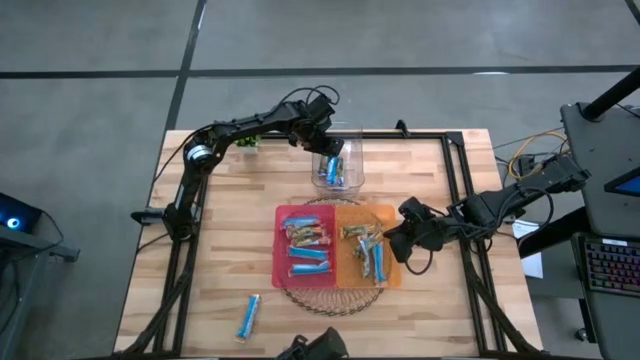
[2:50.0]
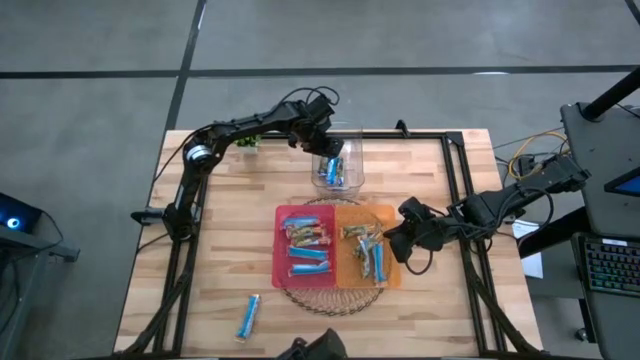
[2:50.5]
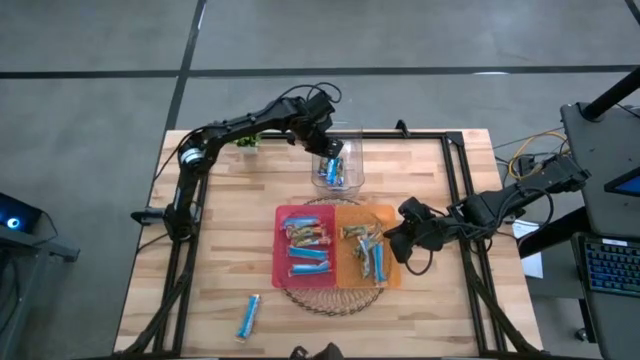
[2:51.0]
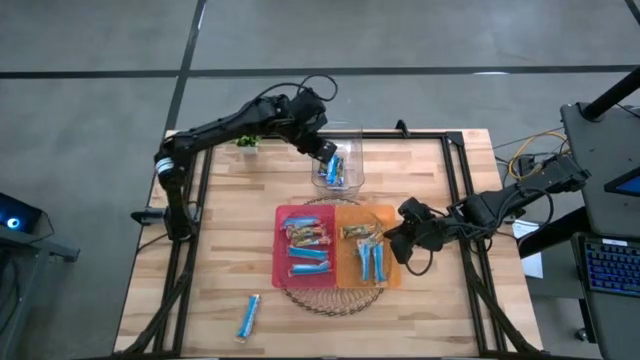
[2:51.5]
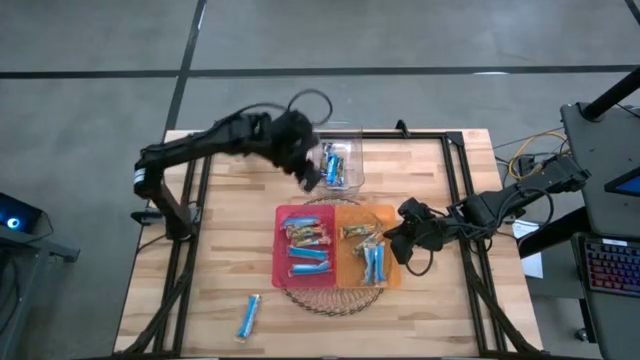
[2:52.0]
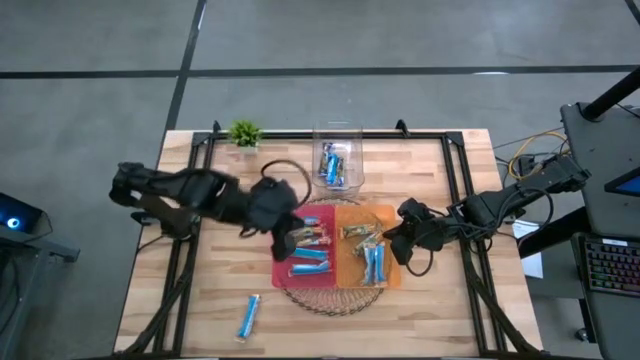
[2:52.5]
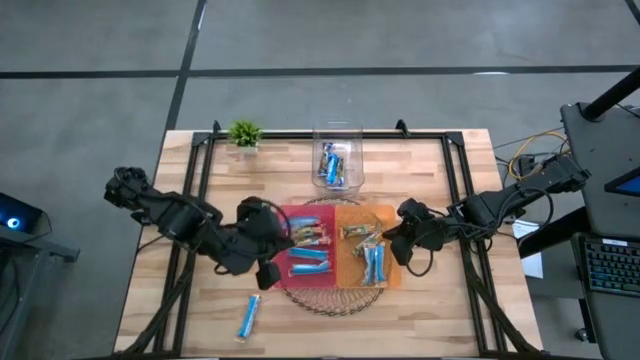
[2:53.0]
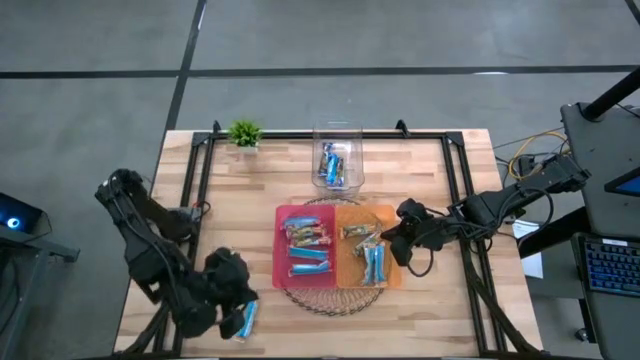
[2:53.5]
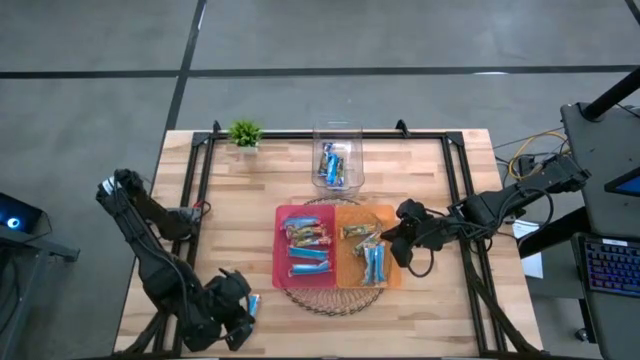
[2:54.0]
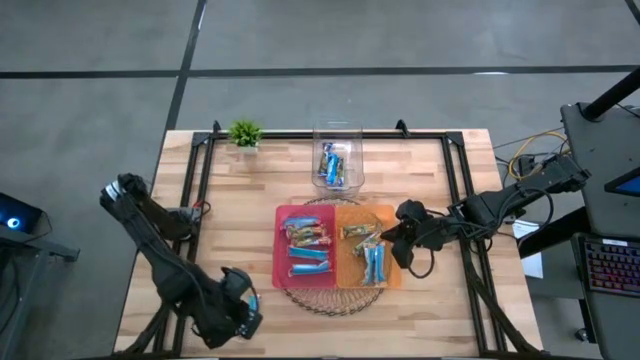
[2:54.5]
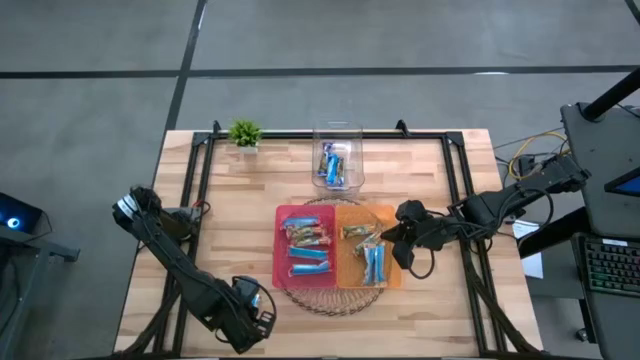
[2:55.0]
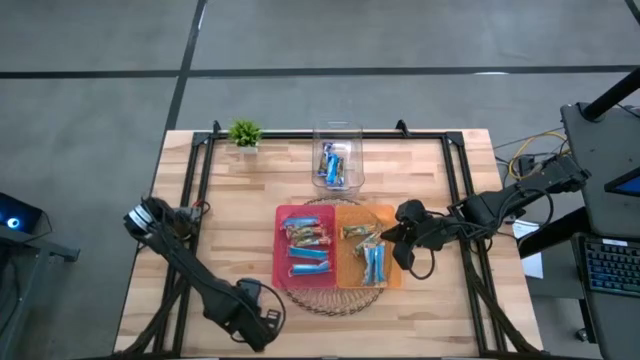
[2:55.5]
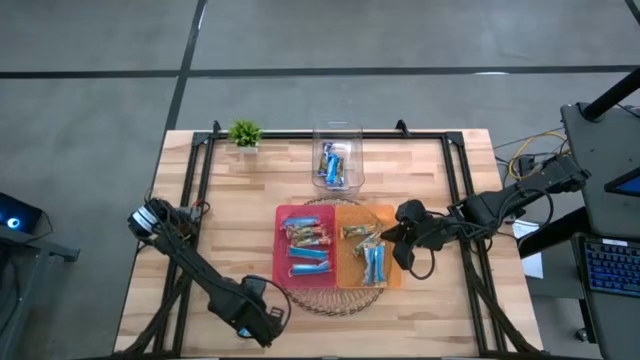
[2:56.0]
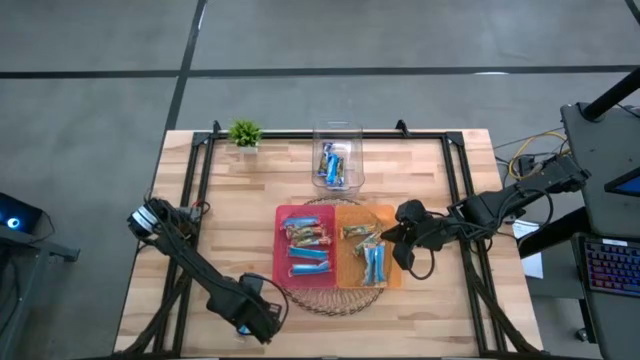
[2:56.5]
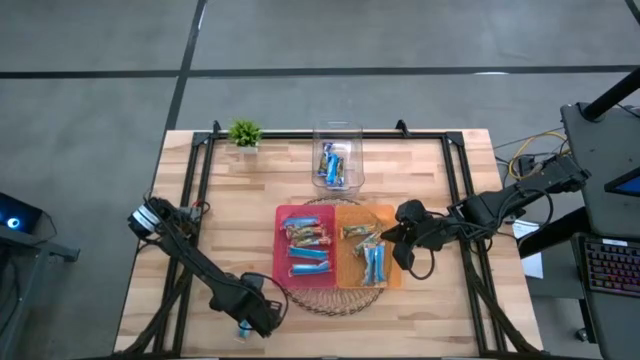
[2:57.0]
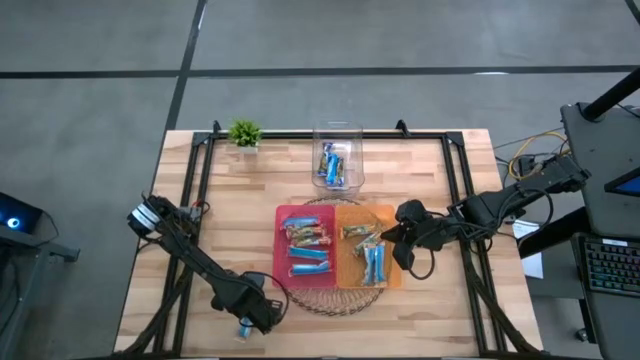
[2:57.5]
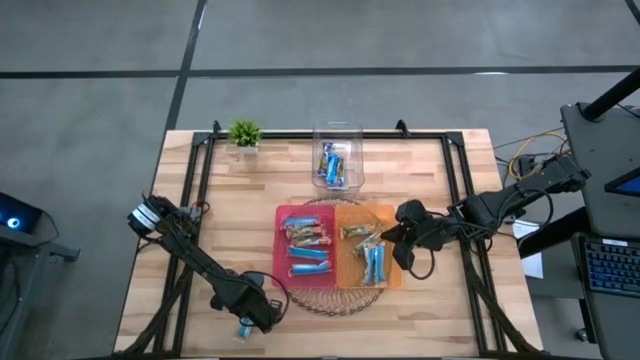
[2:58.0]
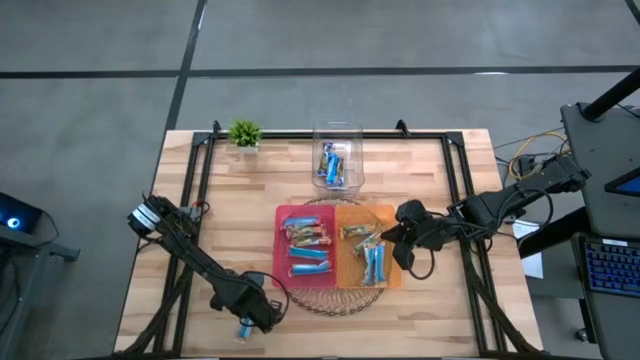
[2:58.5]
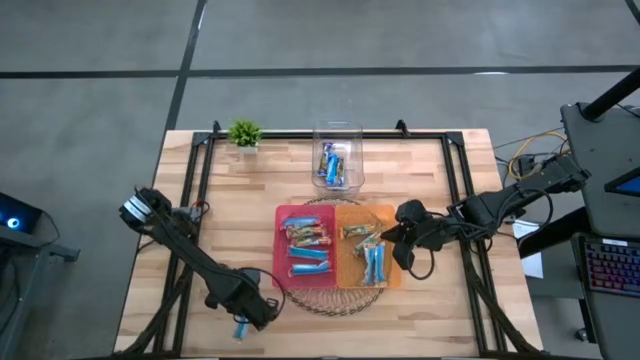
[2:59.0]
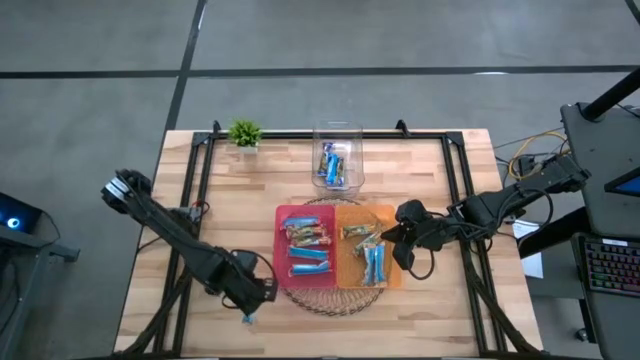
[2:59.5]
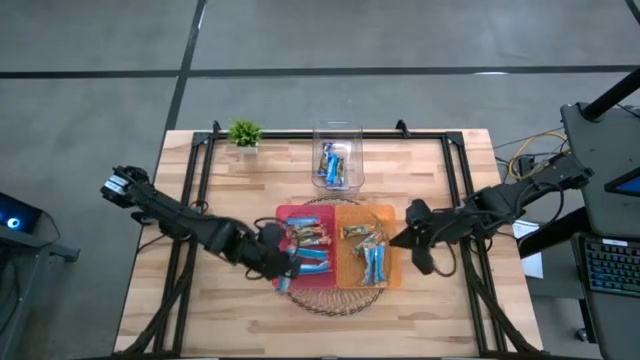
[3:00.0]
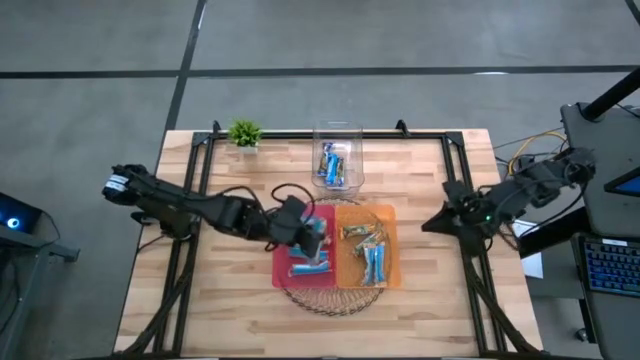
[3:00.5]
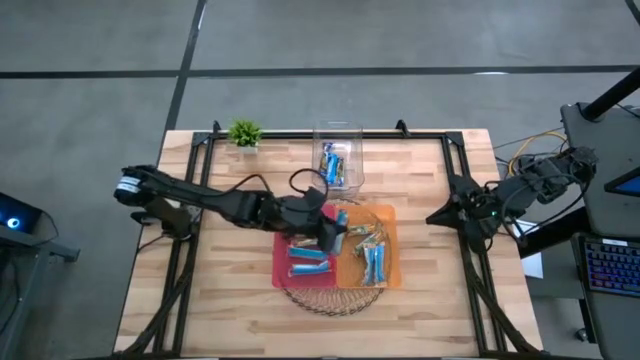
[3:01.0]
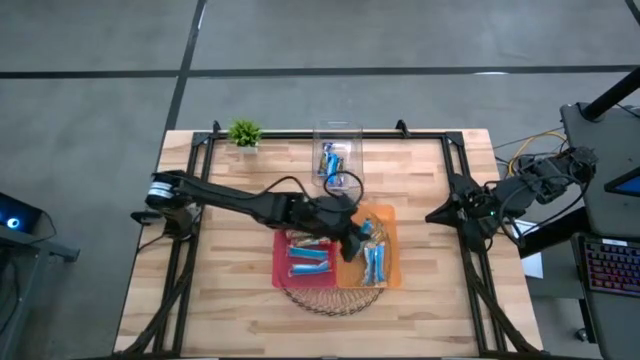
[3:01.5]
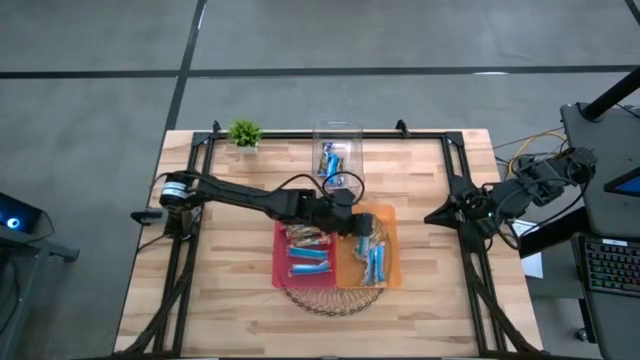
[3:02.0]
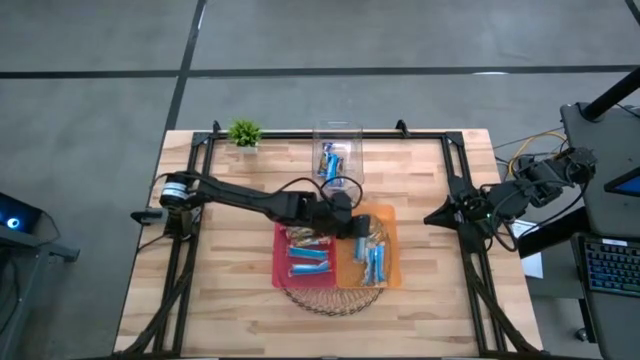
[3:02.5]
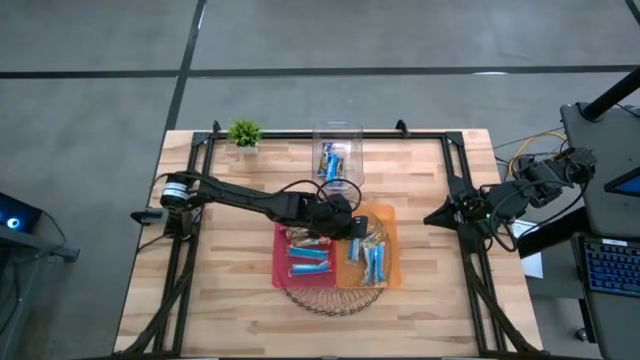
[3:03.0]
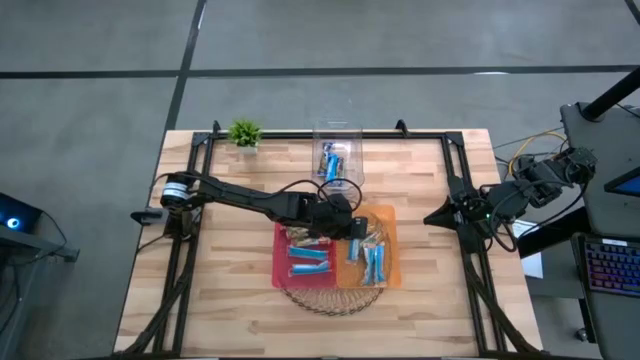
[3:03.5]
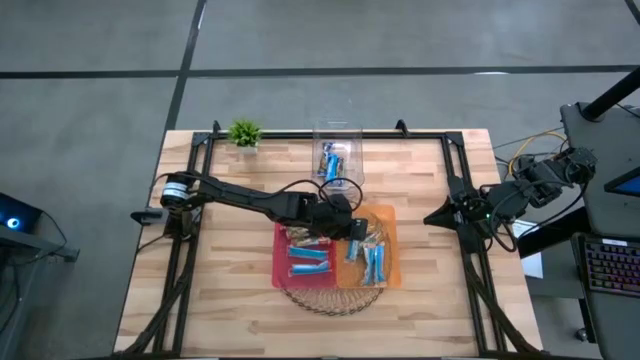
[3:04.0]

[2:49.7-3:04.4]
Task: Pick and place Granola Bars by type
Put the yellow granola bar into the orange bin

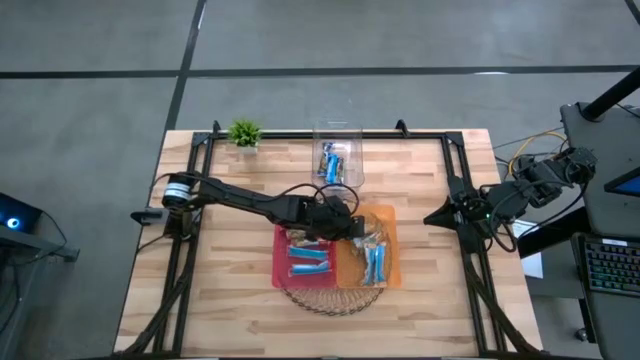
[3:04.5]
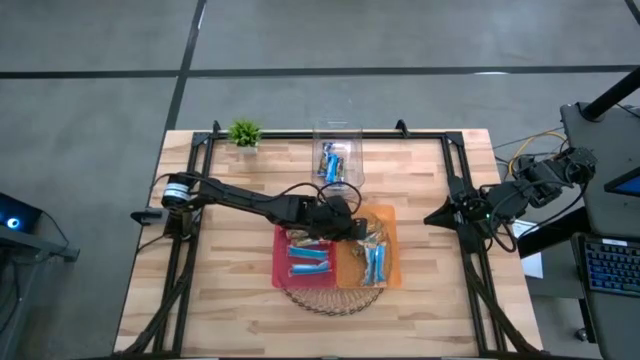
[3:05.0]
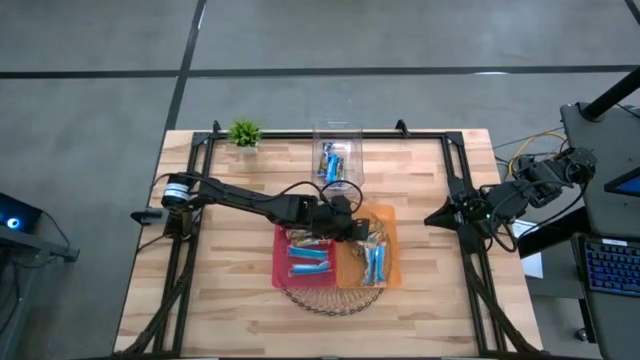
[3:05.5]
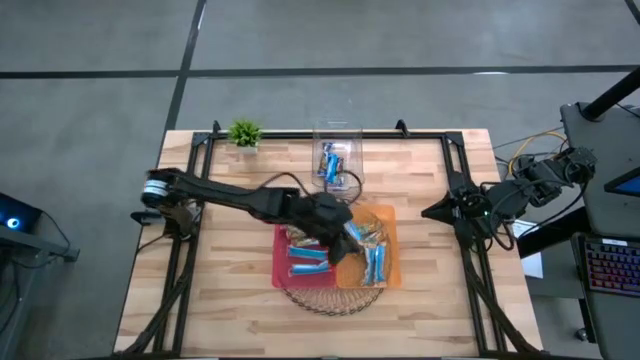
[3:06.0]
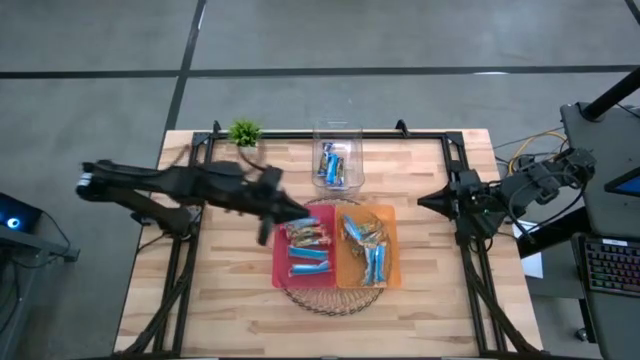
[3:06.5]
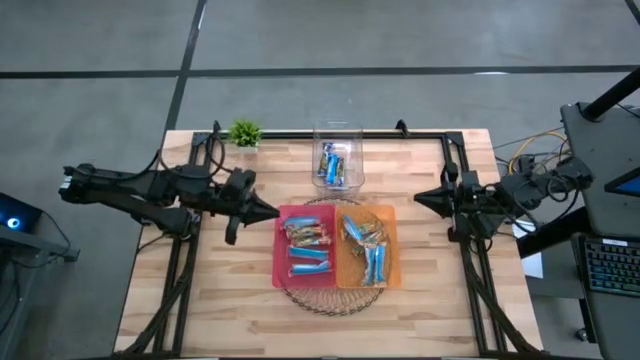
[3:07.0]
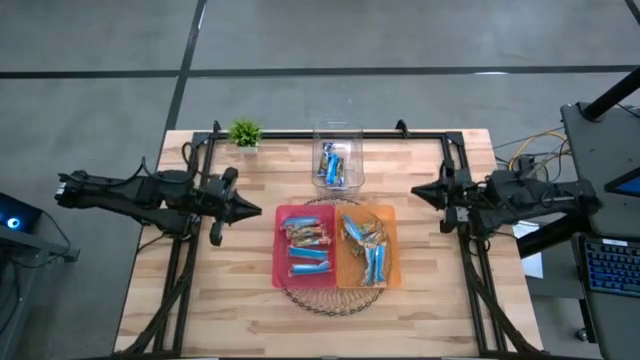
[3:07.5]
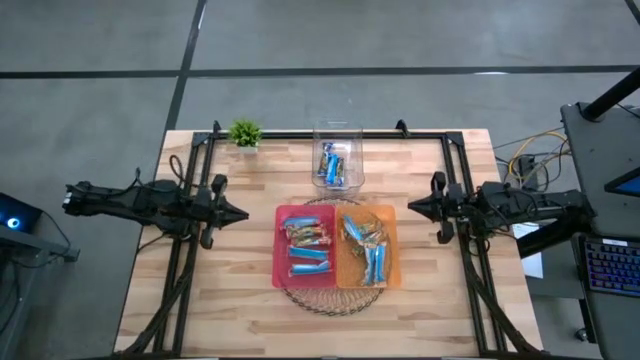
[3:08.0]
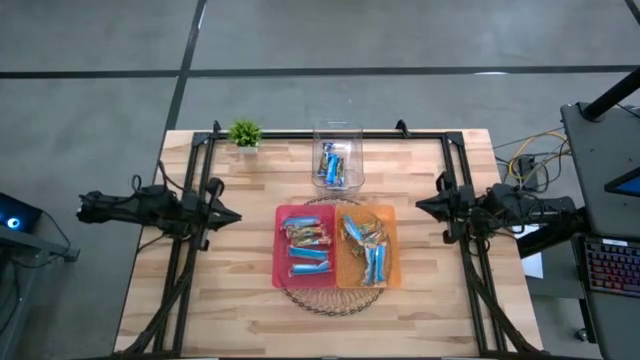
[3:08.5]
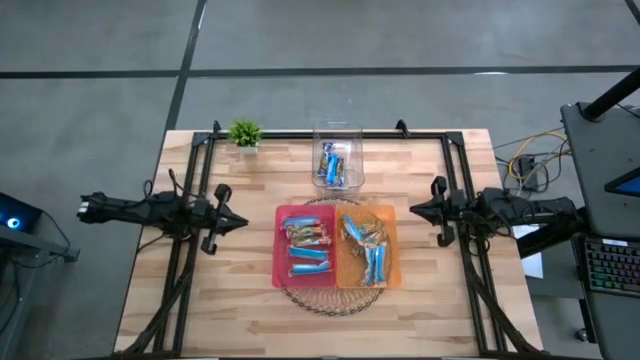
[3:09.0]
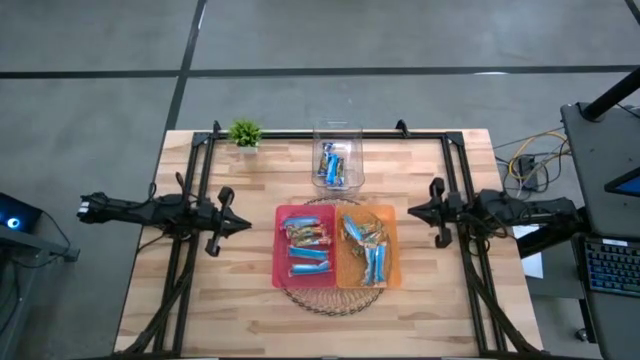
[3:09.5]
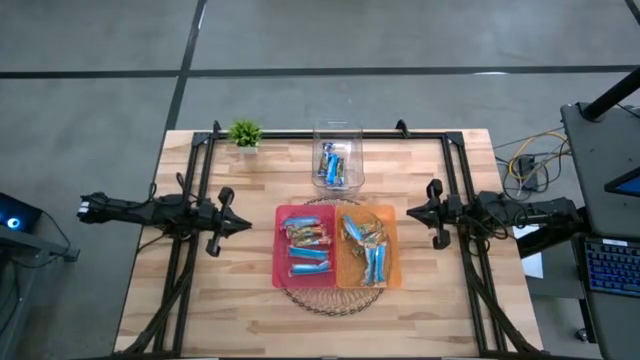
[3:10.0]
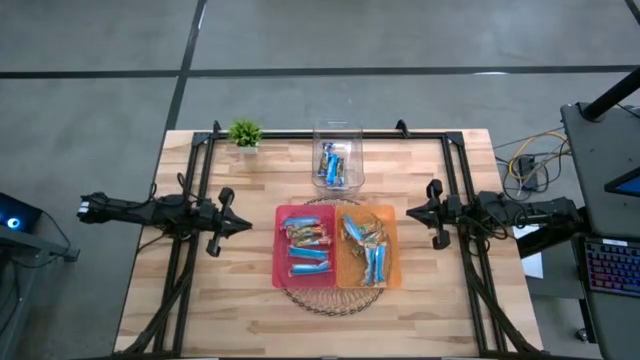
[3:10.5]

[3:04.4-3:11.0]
Return to Home Position

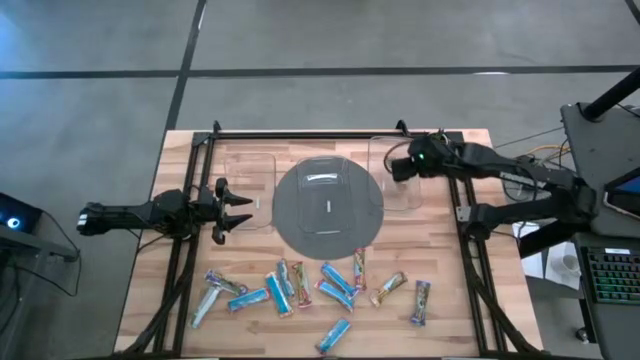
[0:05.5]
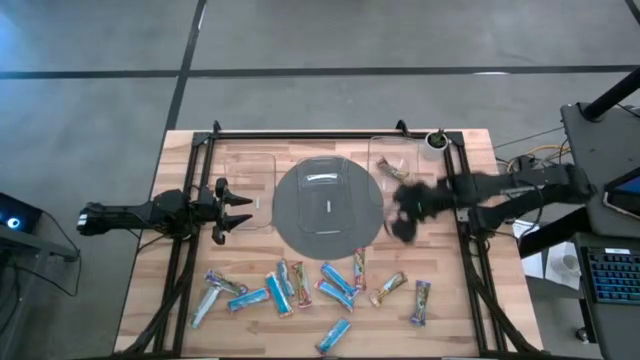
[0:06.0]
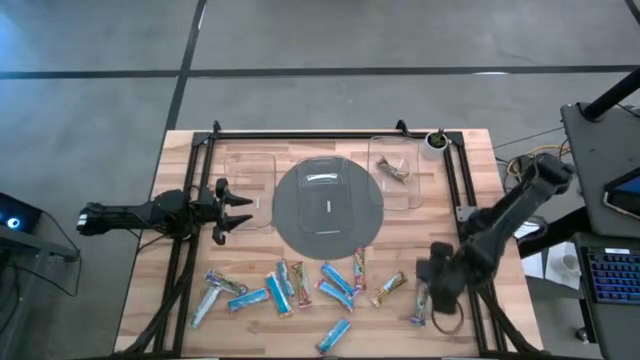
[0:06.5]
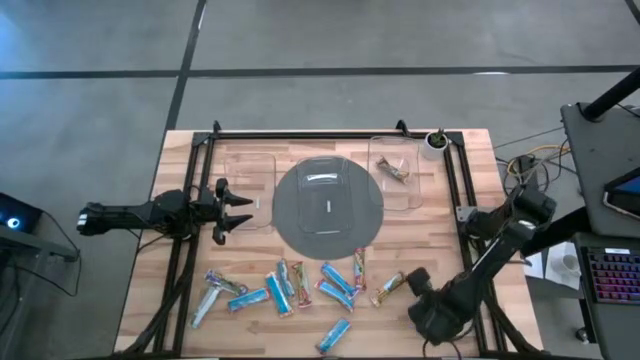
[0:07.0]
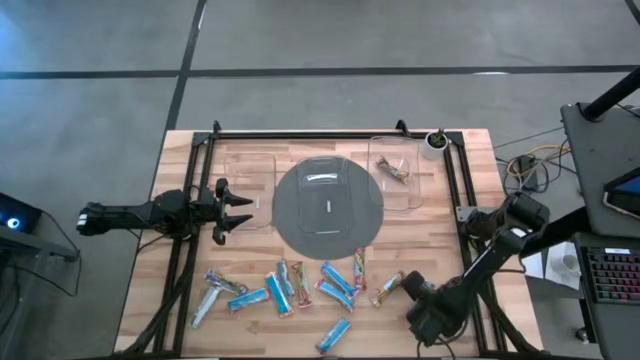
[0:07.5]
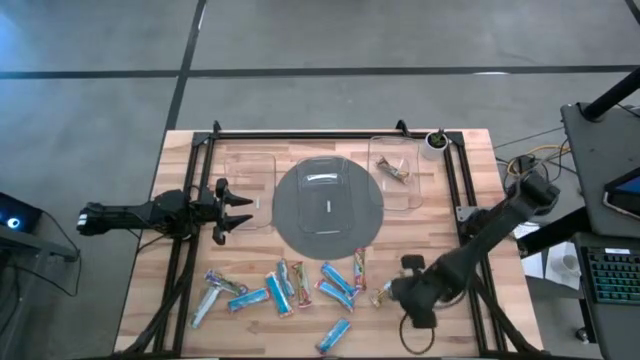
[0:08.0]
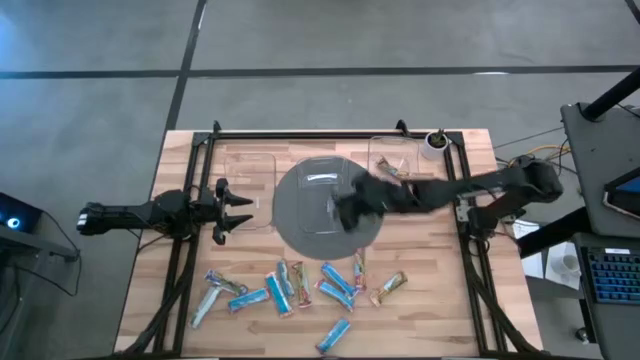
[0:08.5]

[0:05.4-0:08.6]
Task: Pick and place Granola Bars by type
Put the blue granola bar into the middle transparent bin
